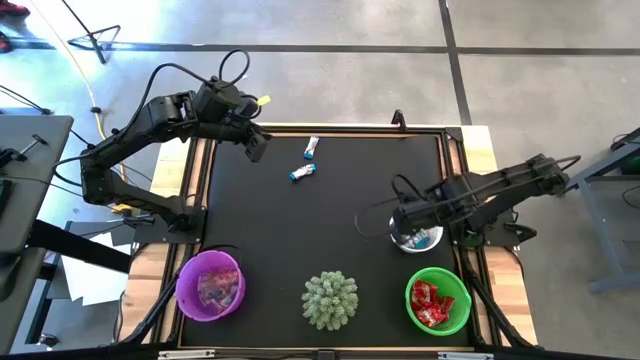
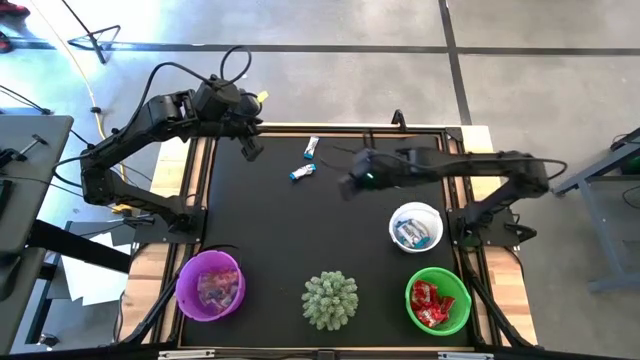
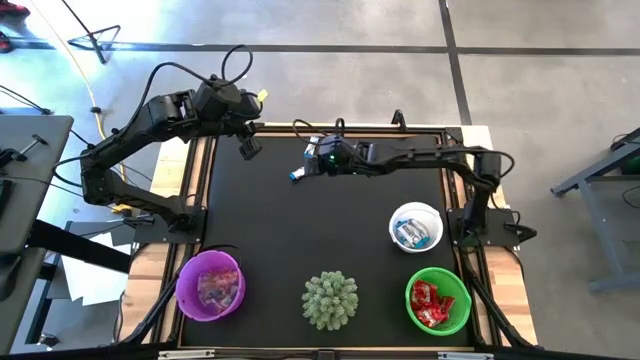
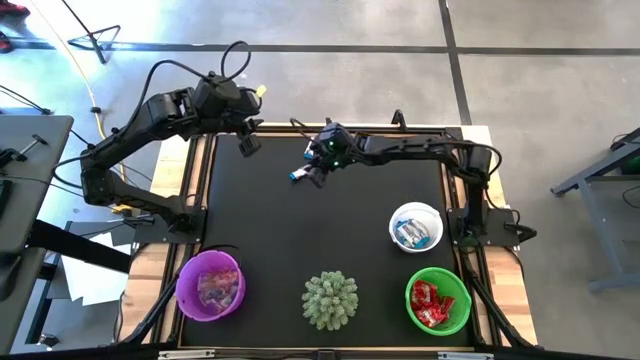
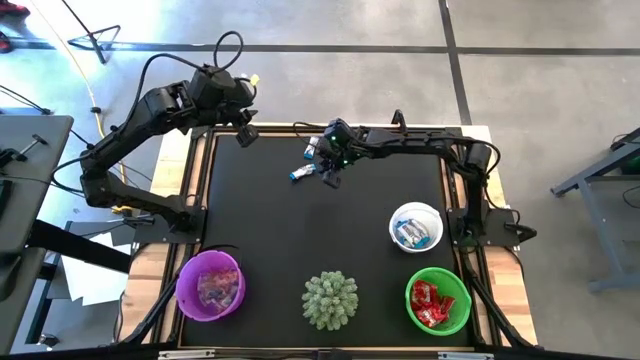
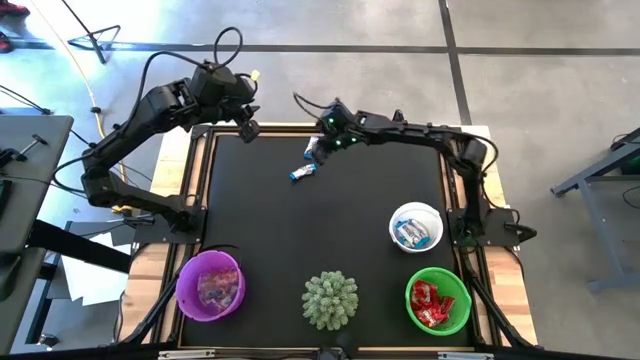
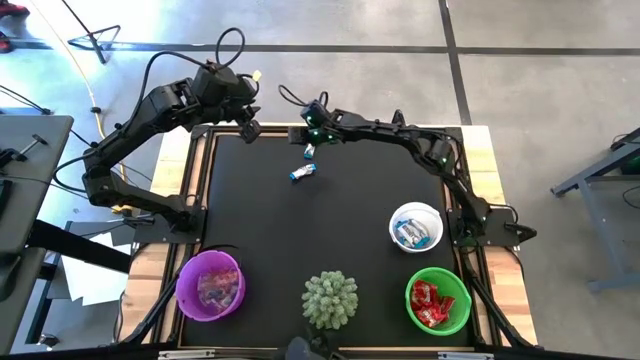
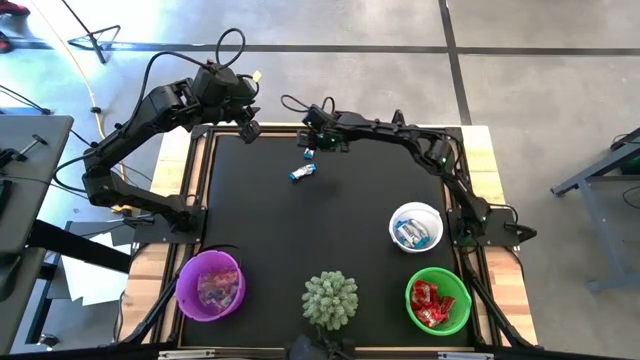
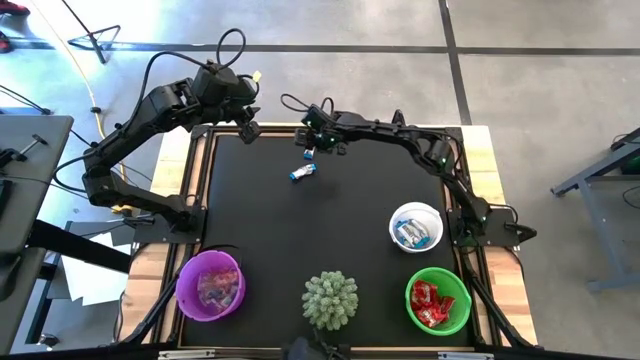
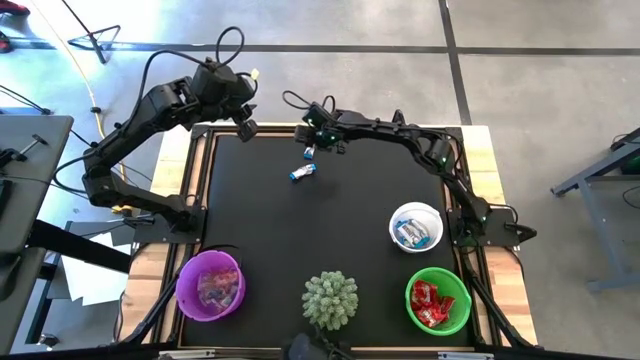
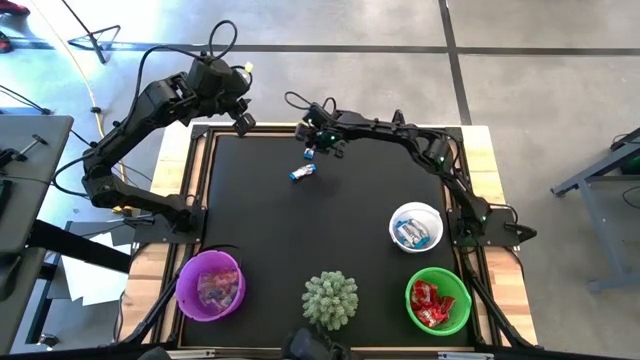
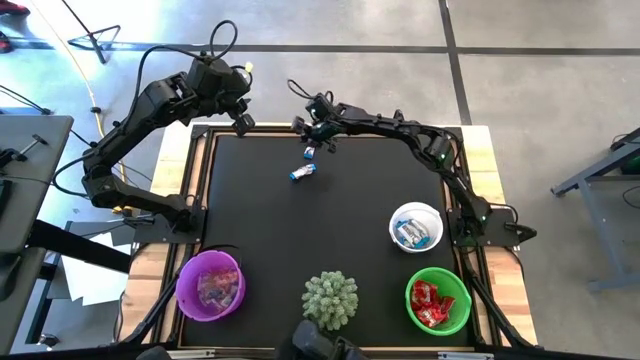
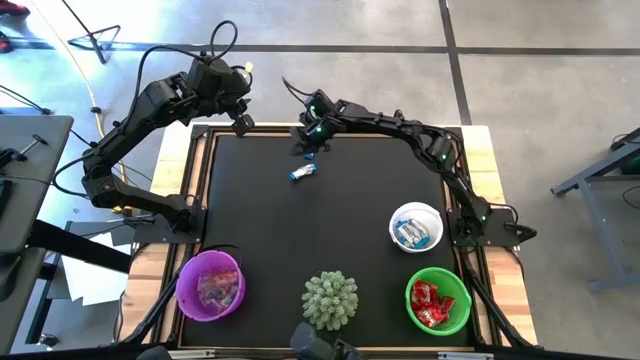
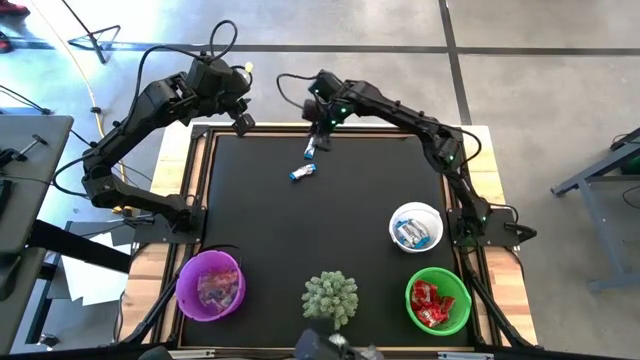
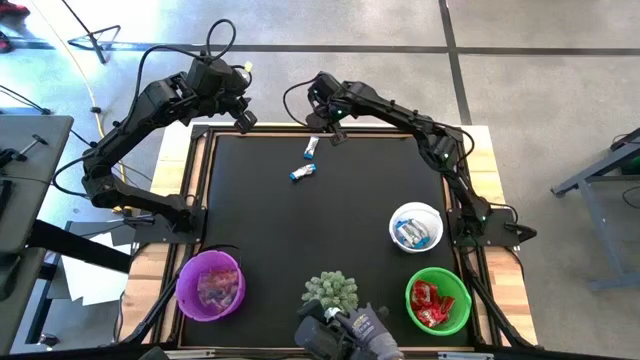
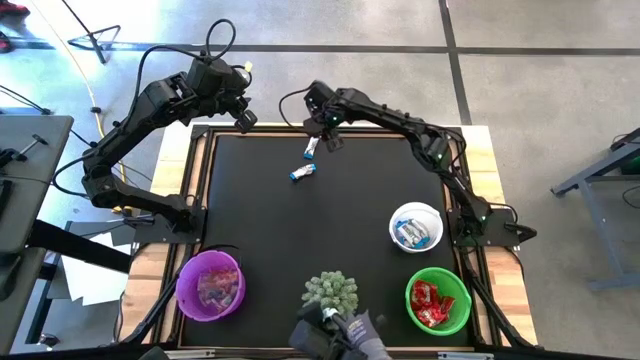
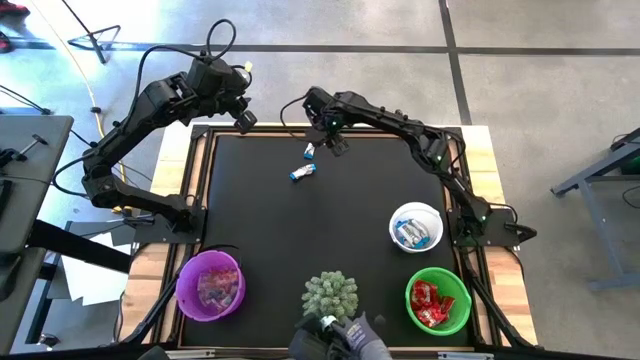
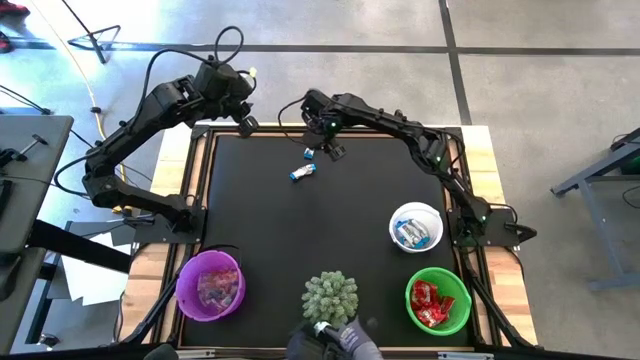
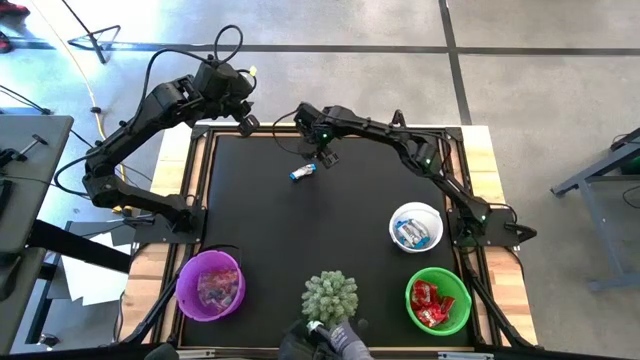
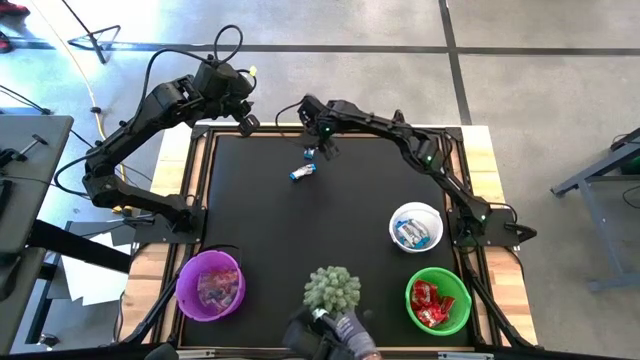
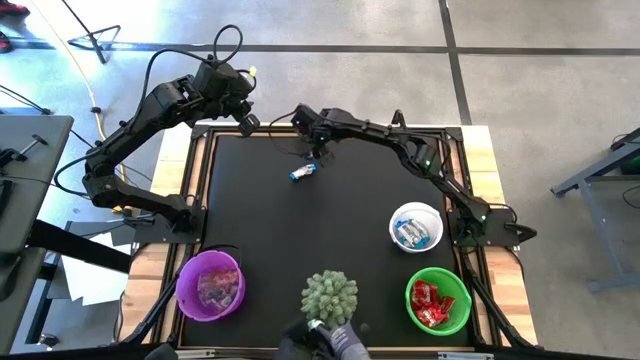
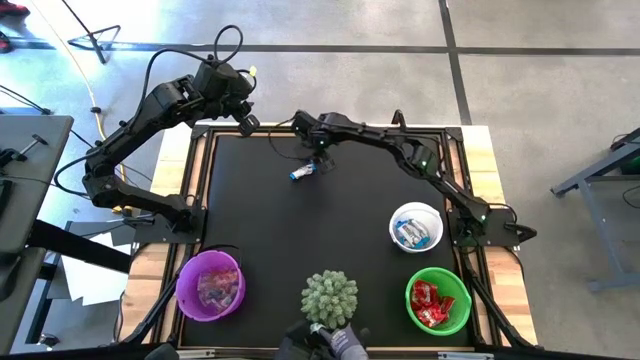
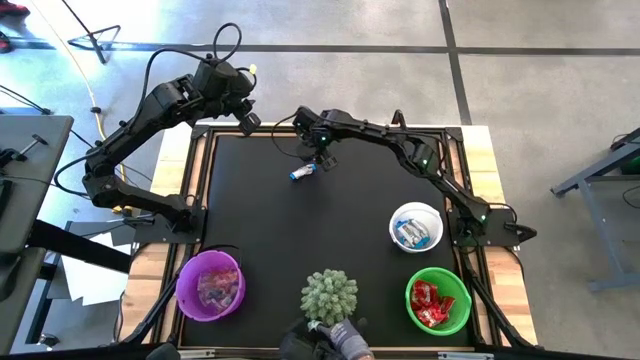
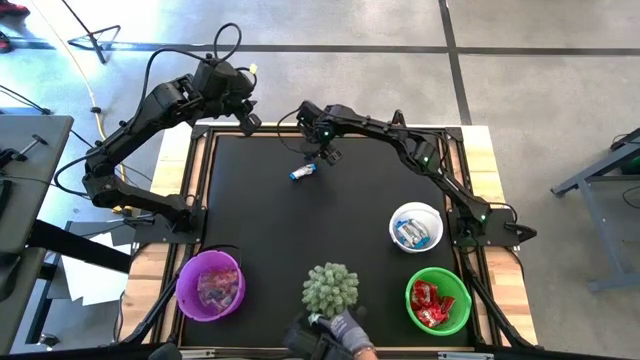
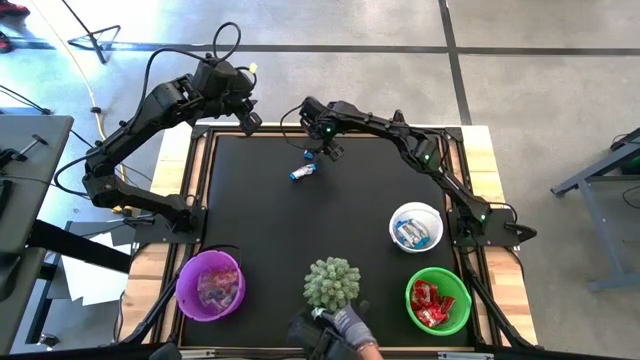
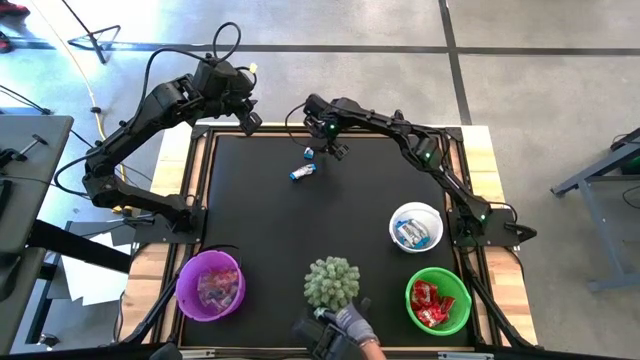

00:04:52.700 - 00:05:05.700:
Task: Sort candy
Put the white candy wrapper into the white bucket

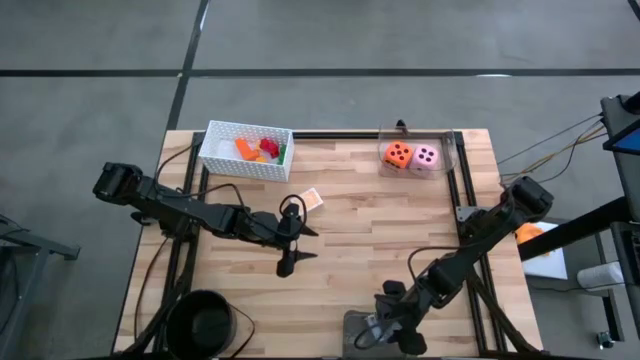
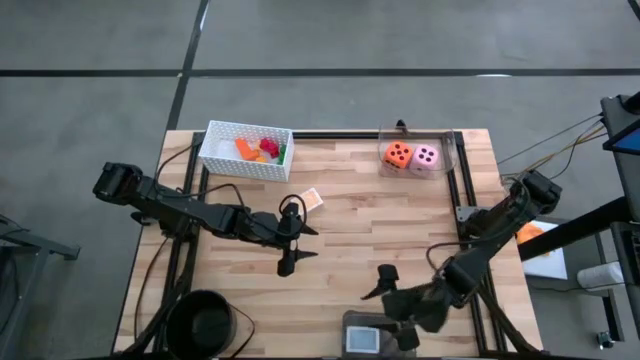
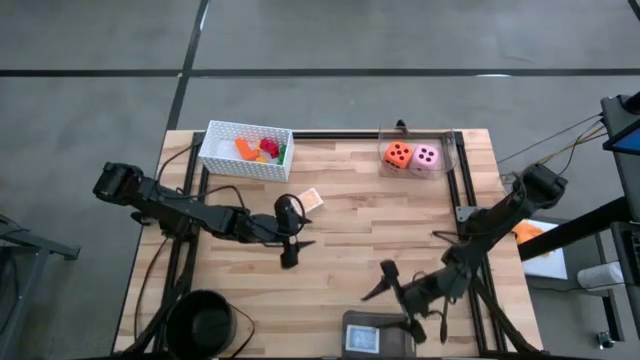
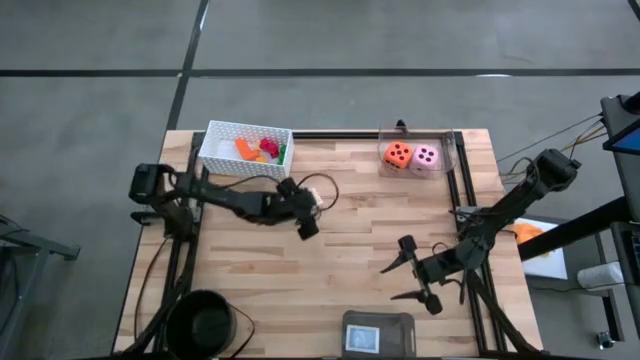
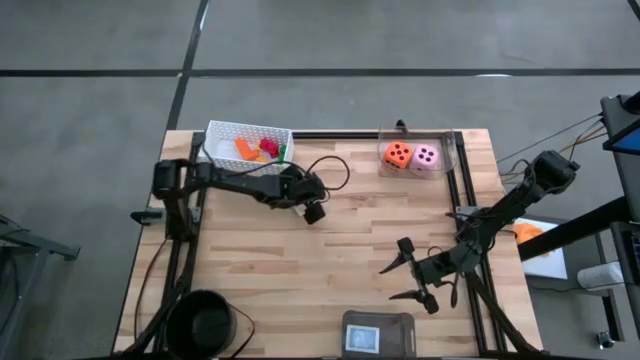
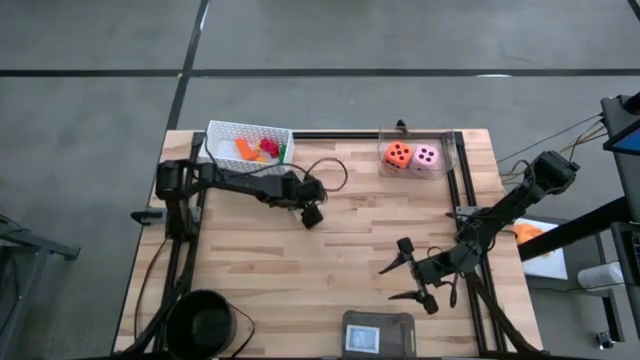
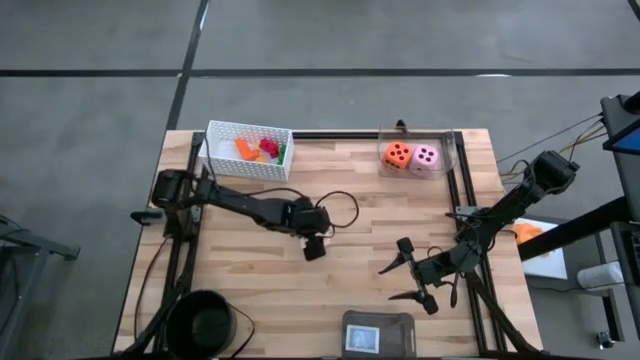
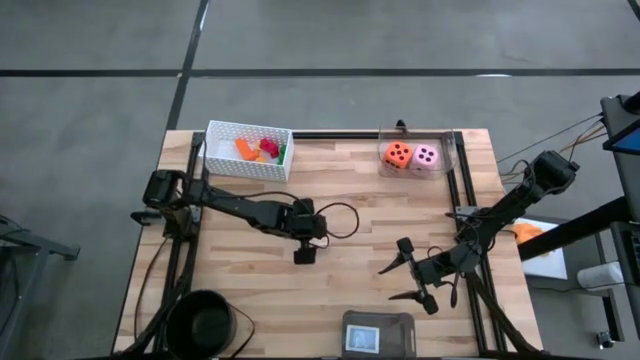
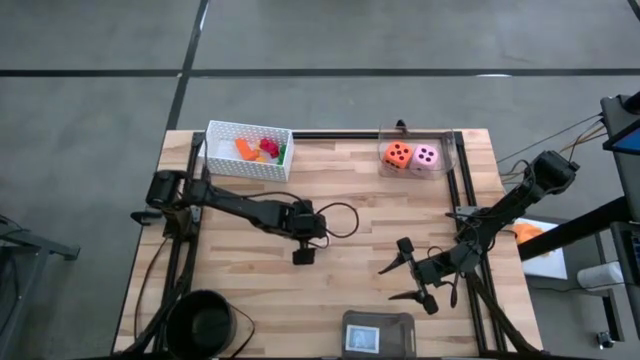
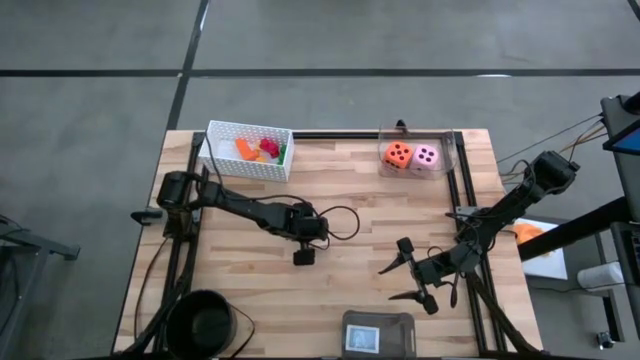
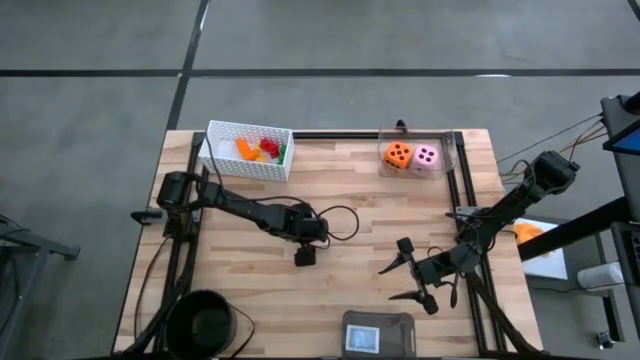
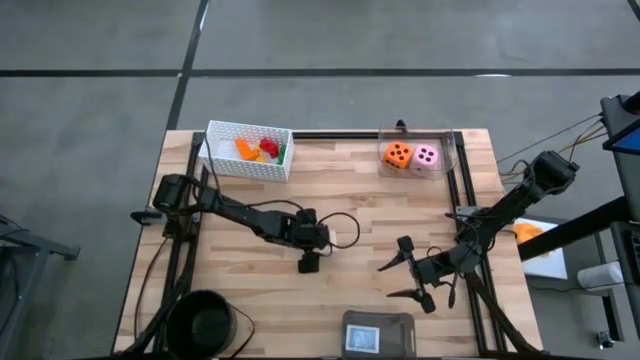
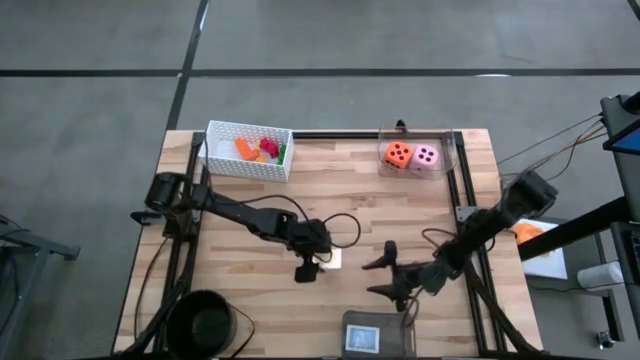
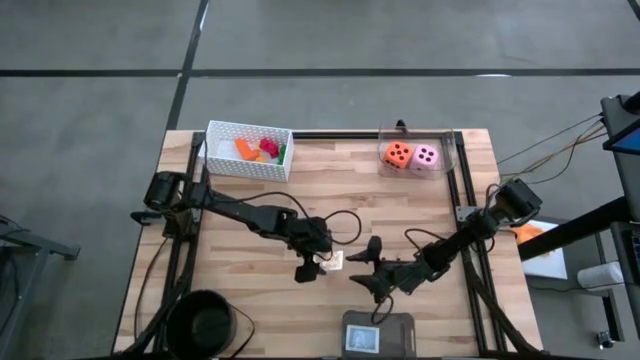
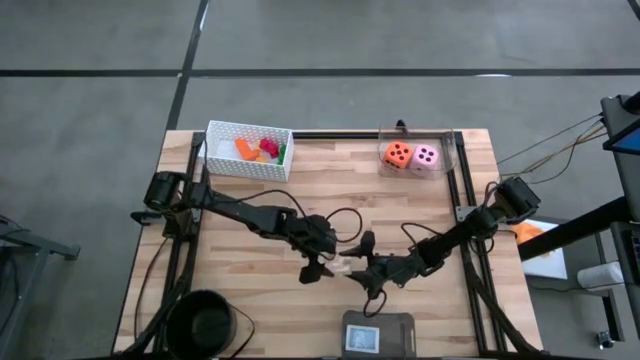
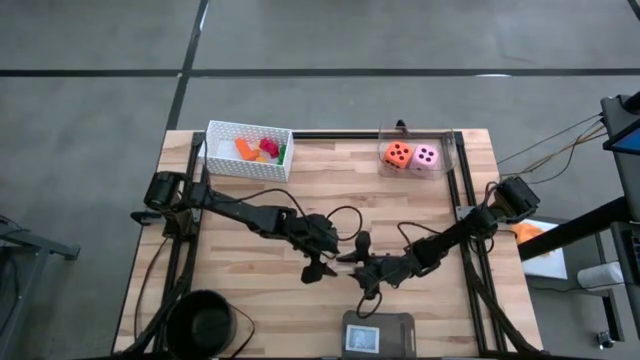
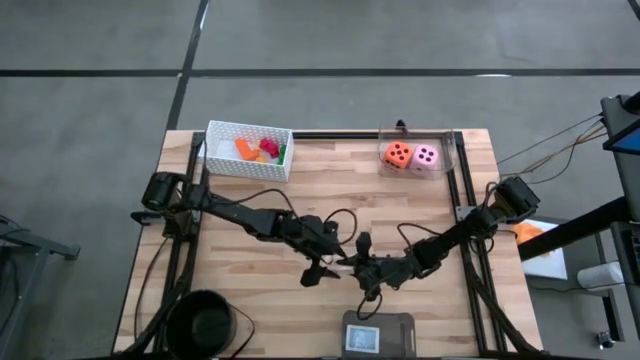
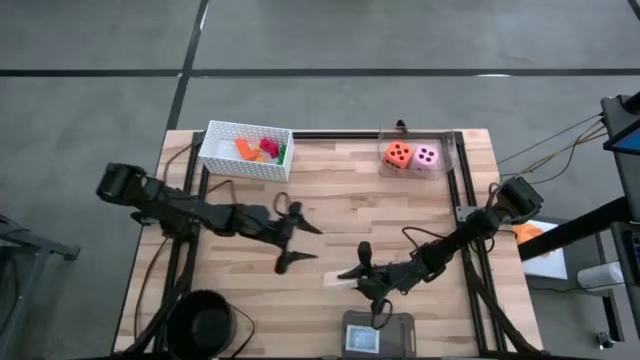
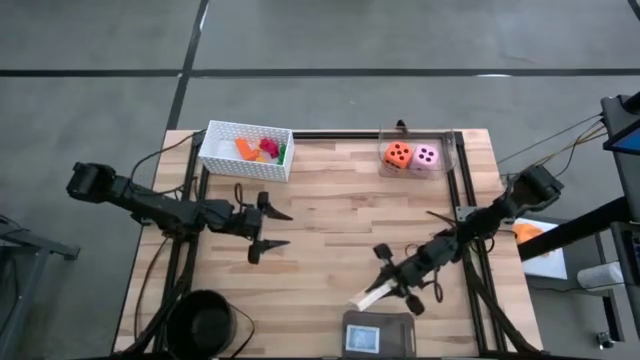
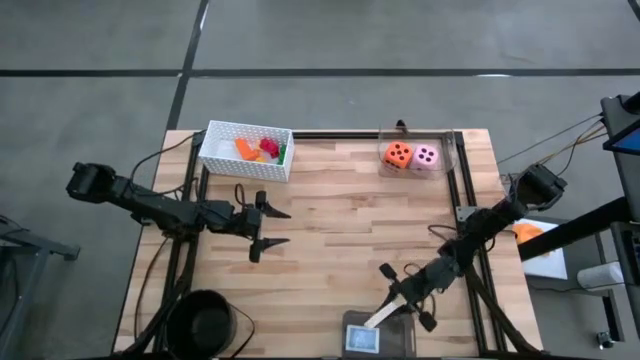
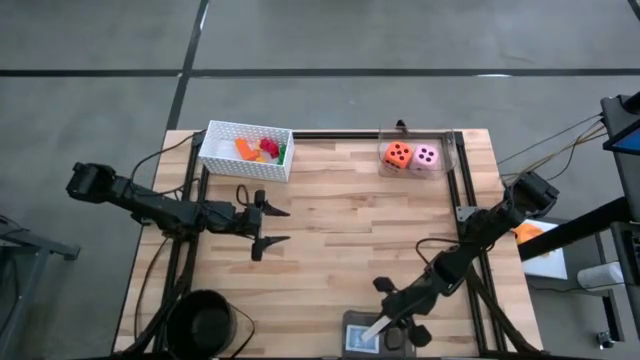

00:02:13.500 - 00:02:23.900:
Task: Pick & Place Toys
Put the yellow game card into the gray bin
